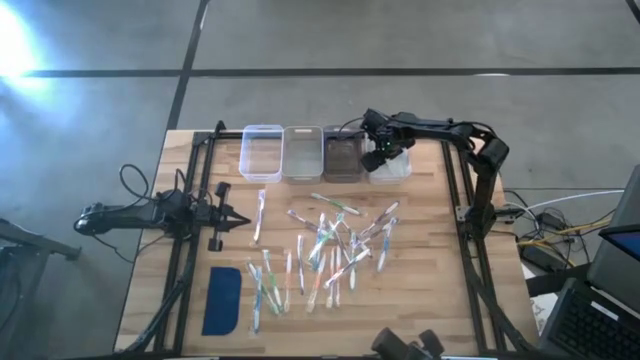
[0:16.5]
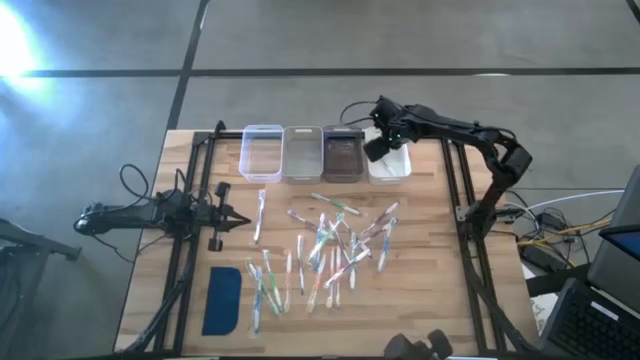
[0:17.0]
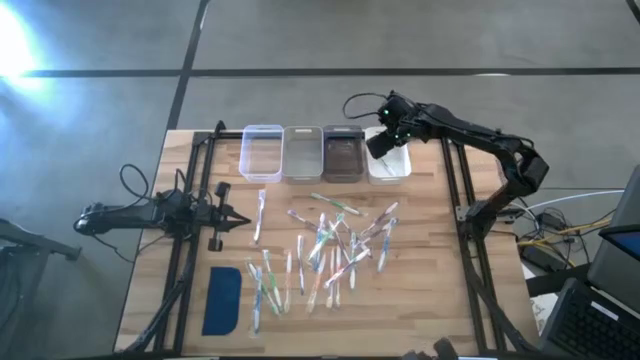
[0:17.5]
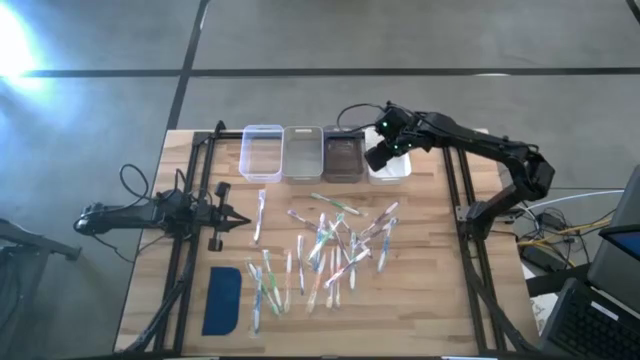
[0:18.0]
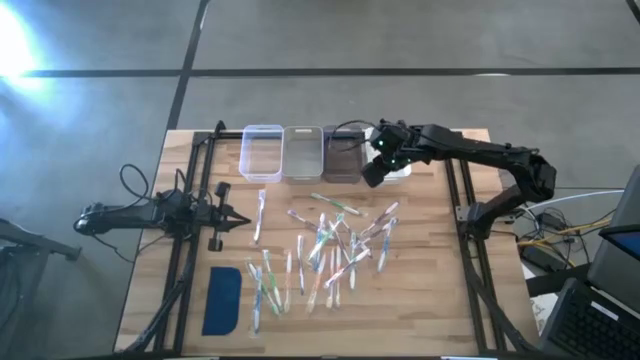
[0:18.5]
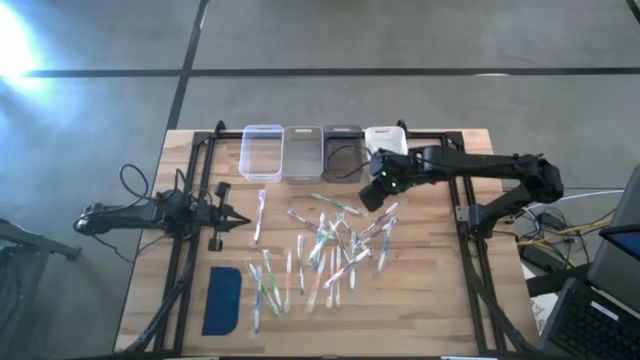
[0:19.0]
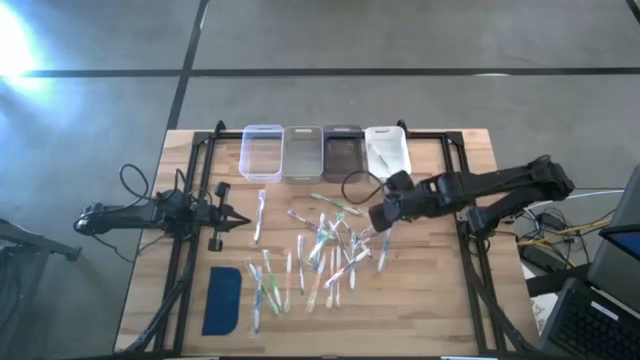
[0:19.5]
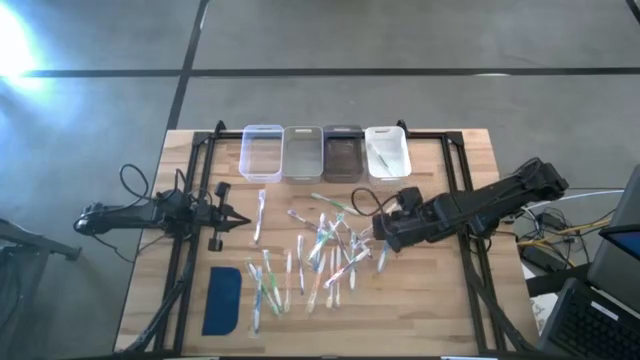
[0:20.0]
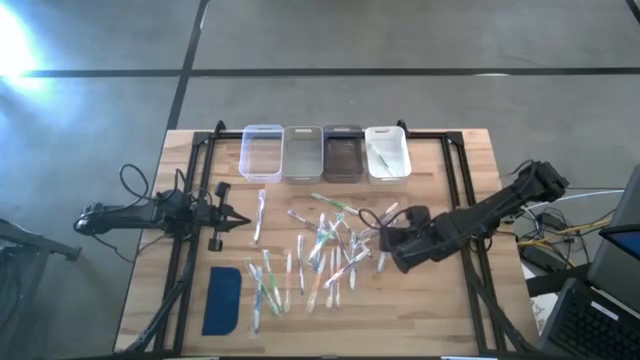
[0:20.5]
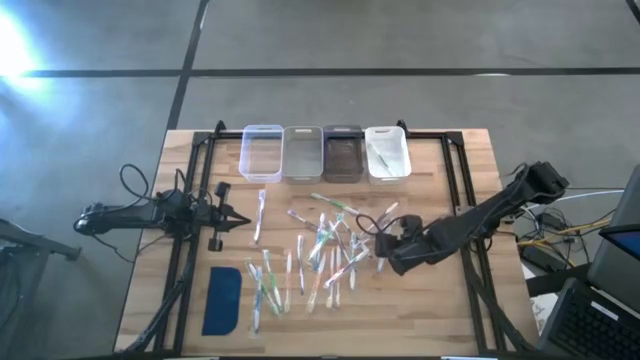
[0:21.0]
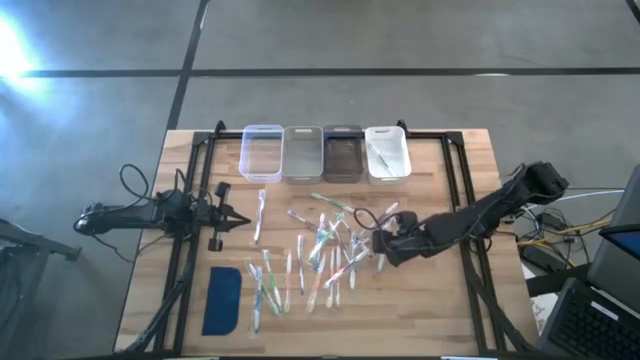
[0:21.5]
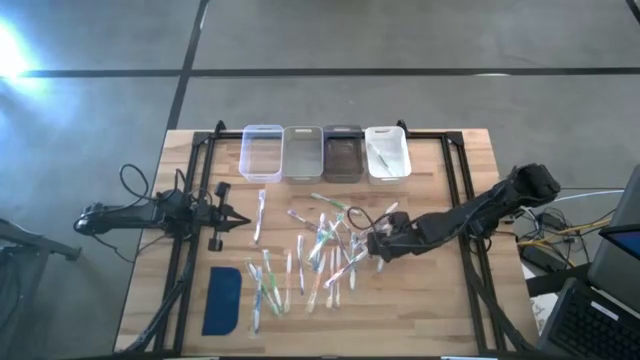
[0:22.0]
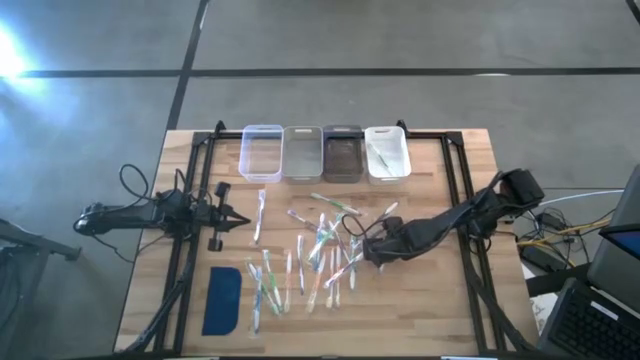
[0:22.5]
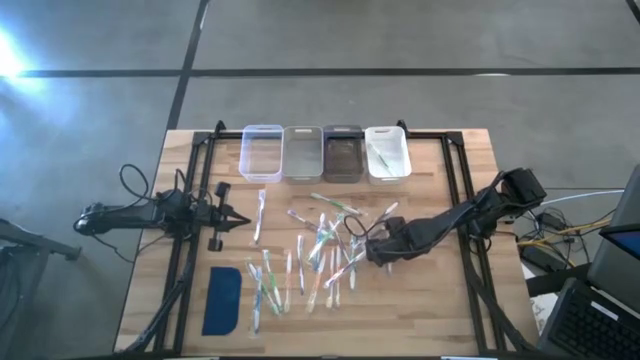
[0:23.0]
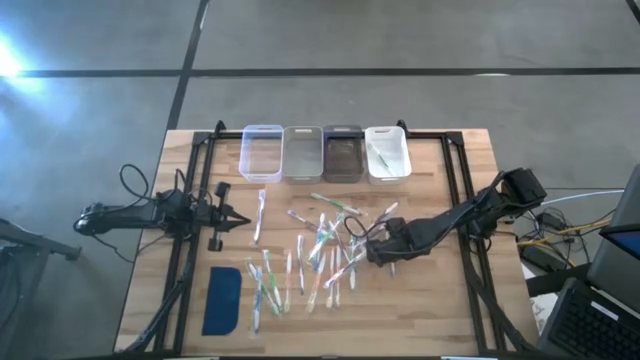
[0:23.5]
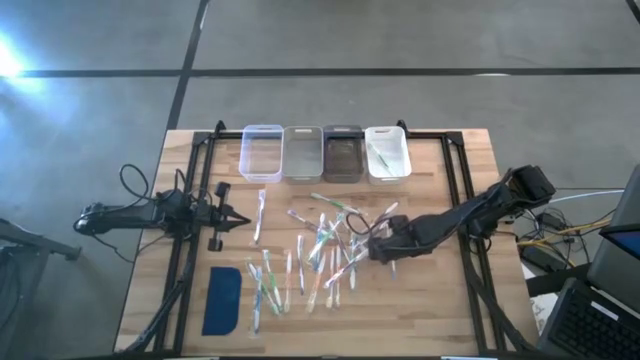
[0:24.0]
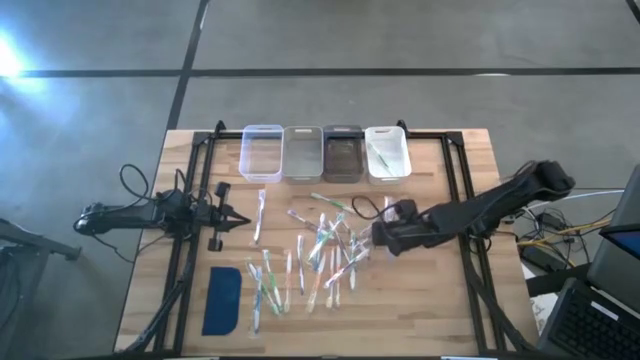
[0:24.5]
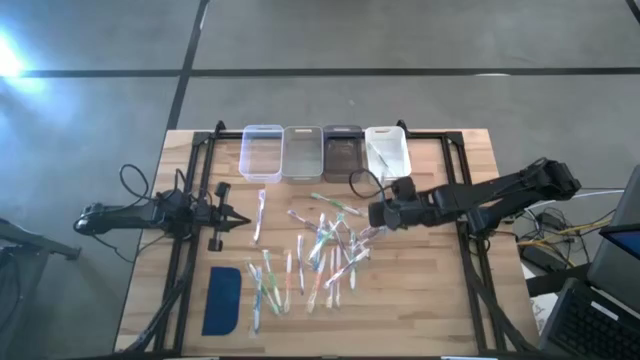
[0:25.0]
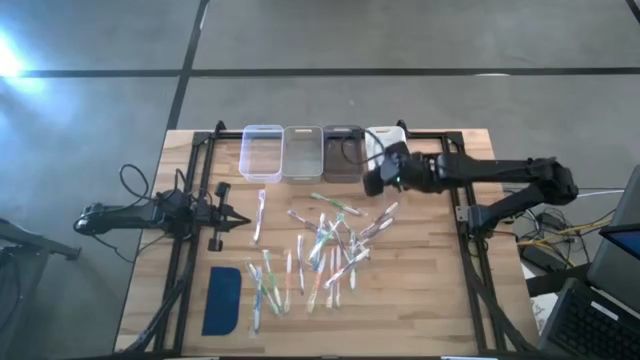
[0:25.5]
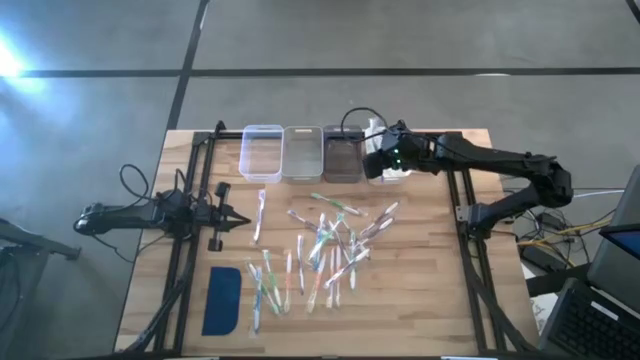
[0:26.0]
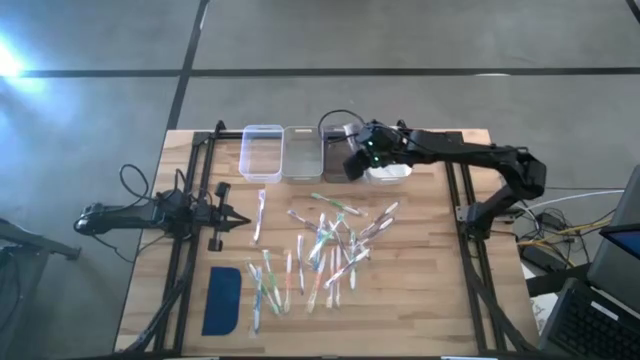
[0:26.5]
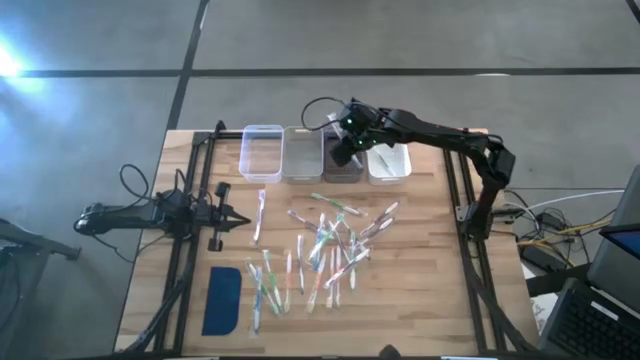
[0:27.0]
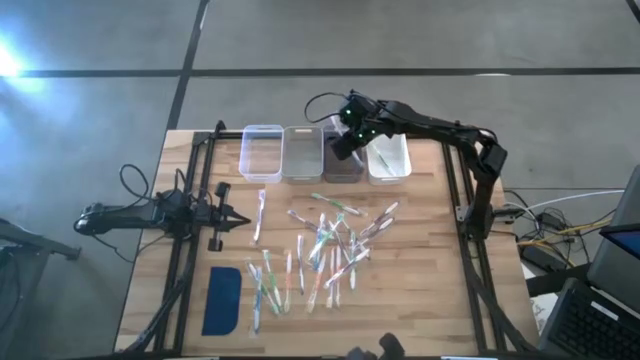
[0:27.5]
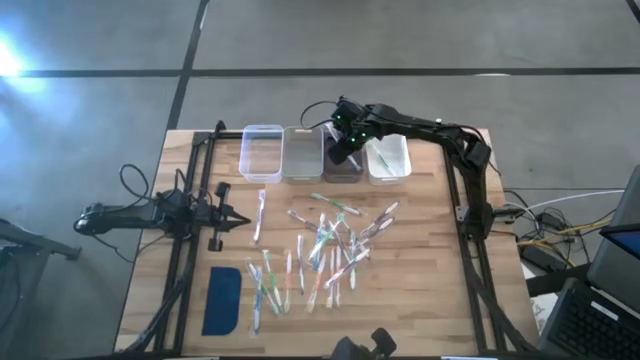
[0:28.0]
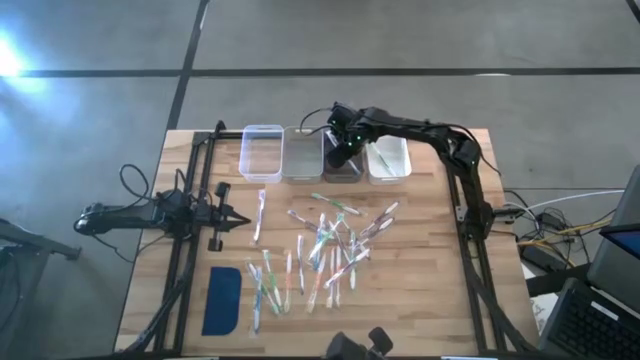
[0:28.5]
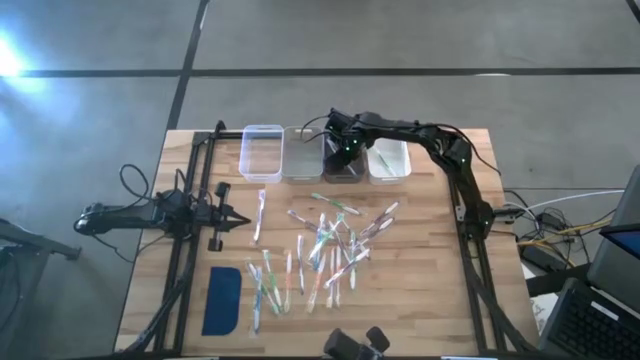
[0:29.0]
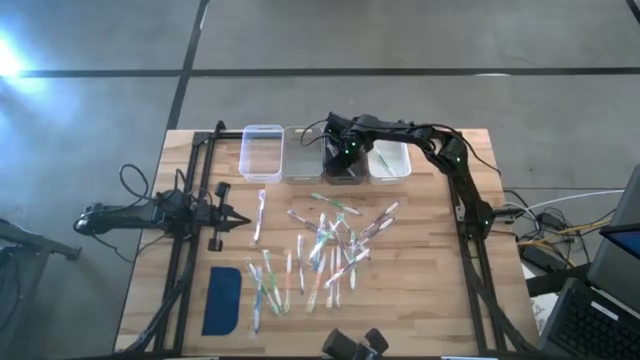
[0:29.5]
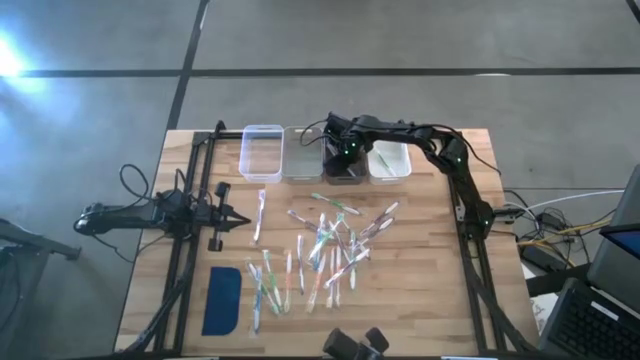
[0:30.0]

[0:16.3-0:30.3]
Task: Pick & Place Toothbrushes
Put the blue toothbrush into the black transparent bin

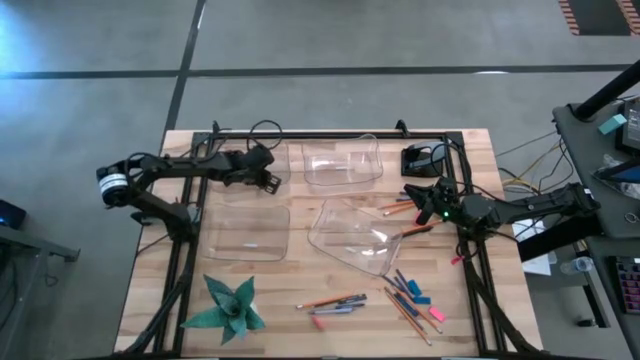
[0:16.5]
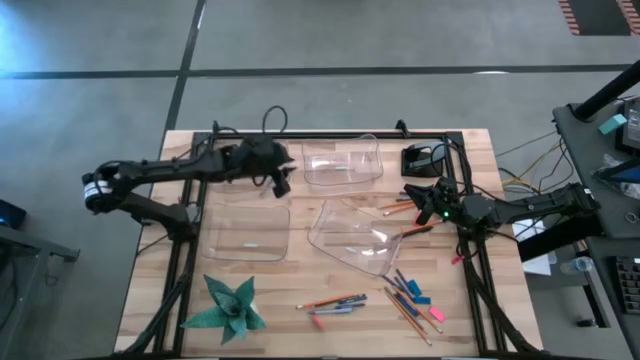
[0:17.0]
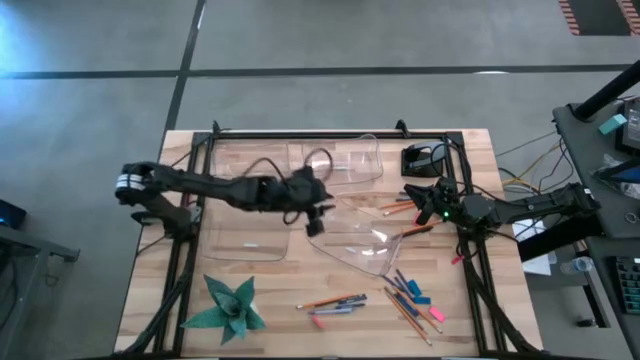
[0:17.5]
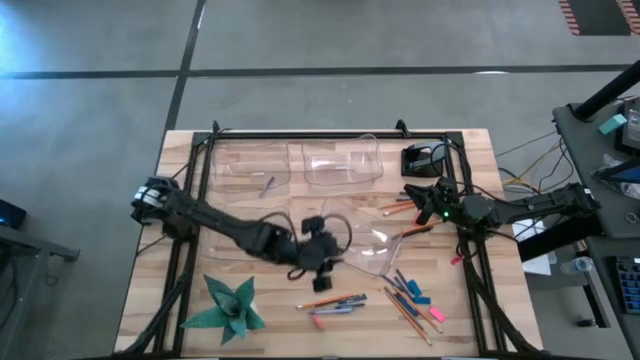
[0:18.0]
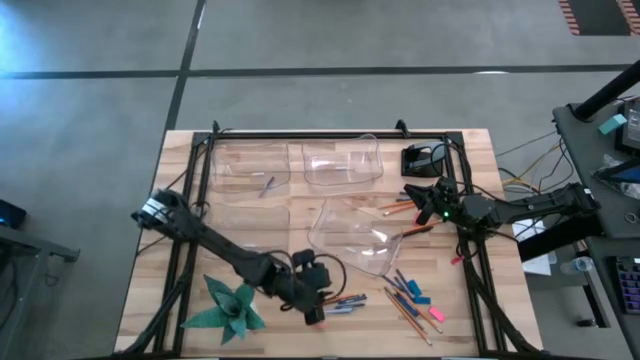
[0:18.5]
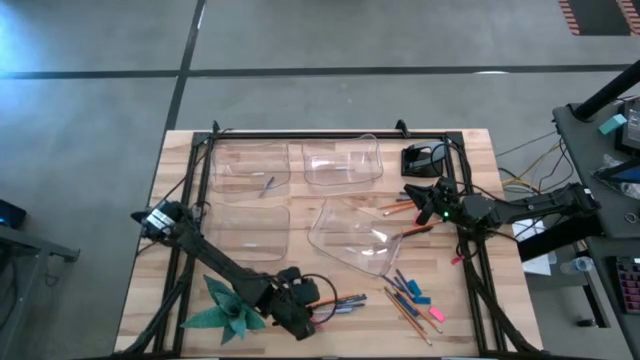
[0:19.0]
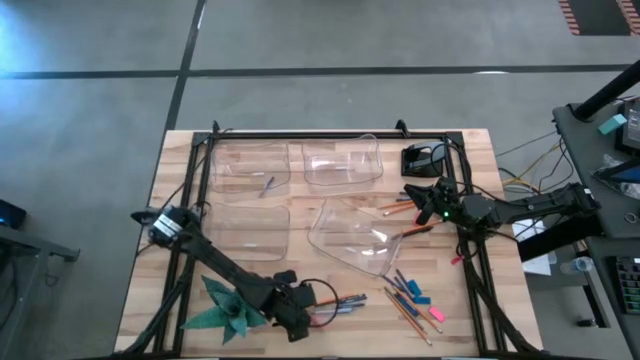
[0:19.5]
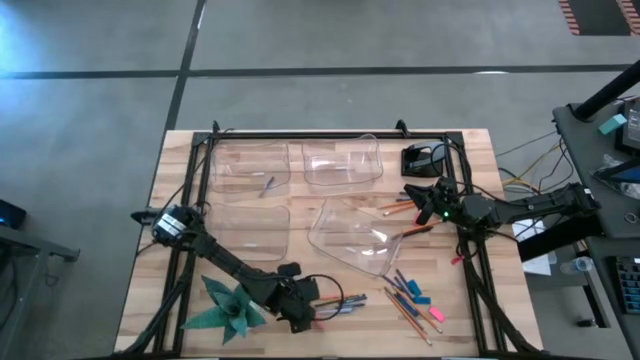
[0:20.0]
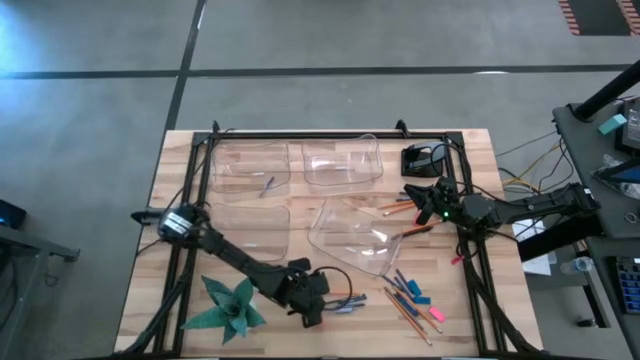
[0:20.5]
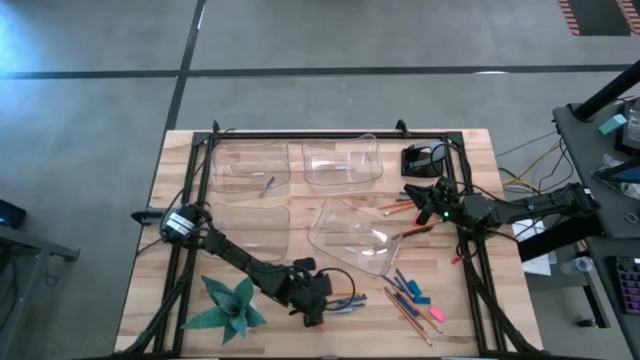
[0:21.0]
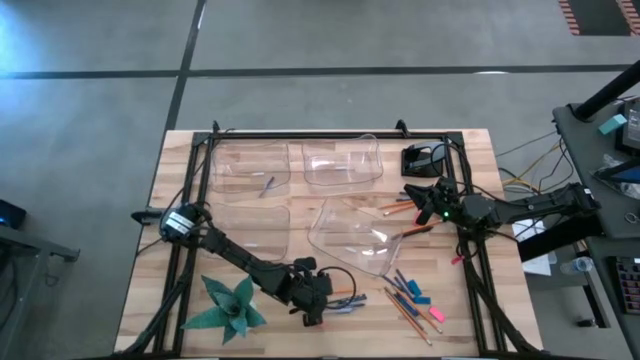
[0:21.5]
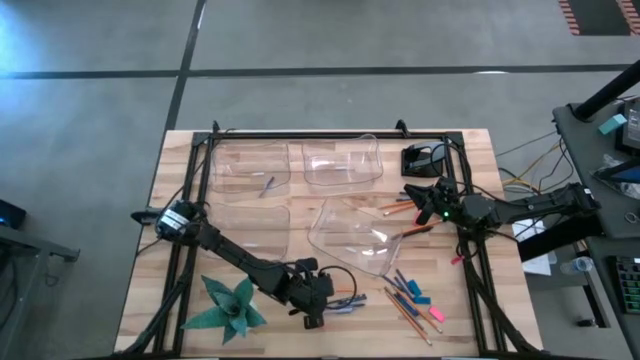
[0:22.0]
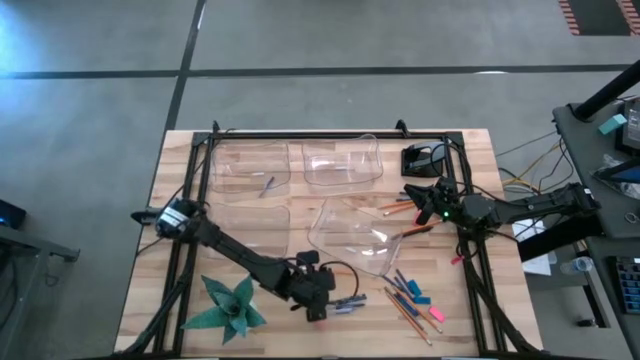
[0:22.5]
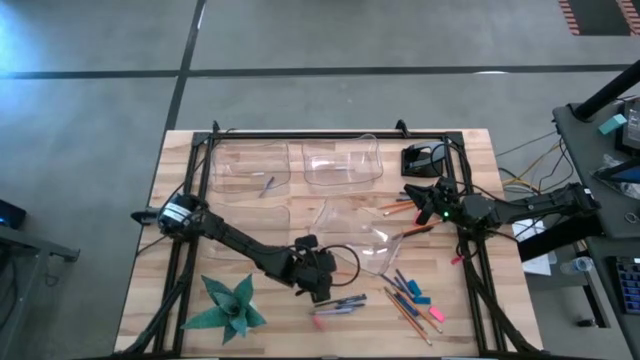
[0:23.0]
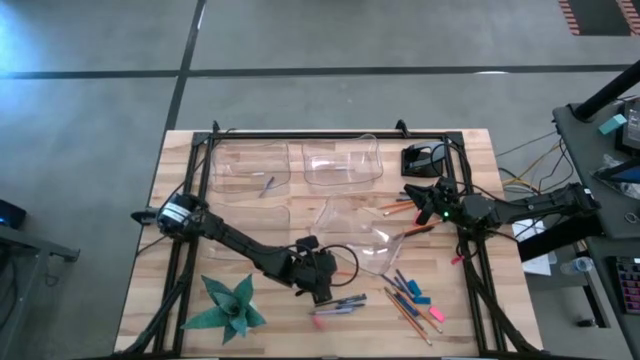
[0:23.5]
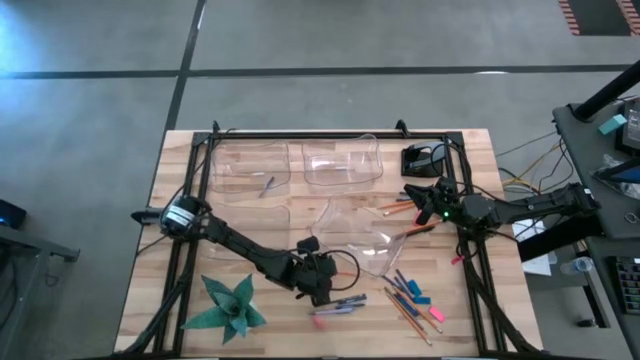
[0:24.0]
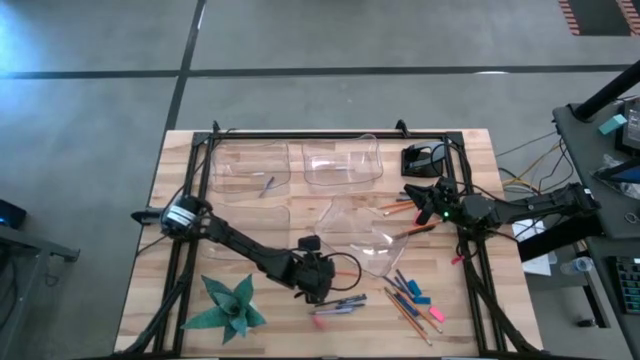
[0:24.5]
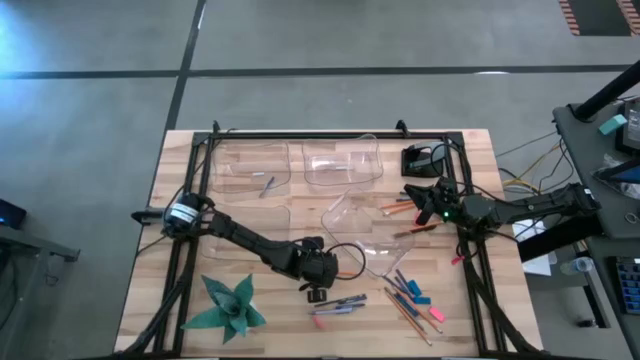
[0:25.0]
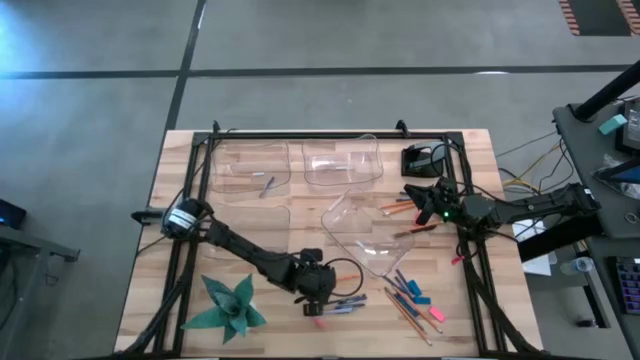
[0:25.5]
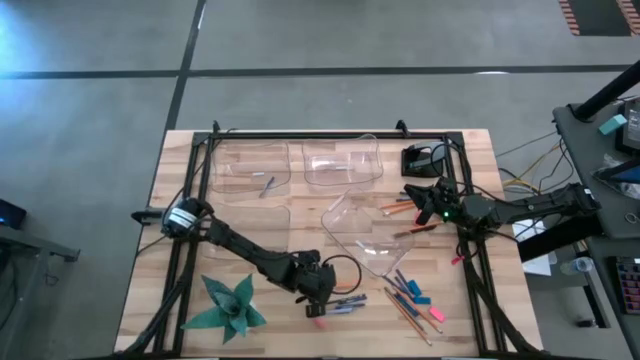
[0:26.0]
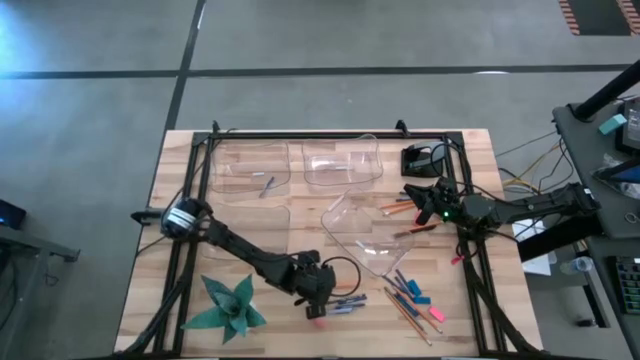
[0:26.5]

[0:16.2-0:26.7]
Task: Sort crayons/erasers/pens/pencils in bins
Put the orange pencil into the top right transparent bin
